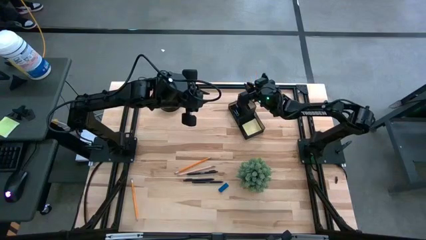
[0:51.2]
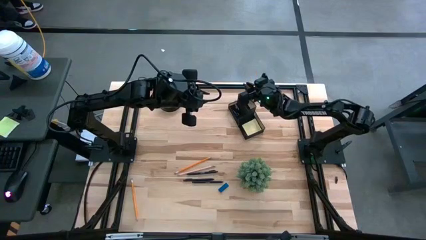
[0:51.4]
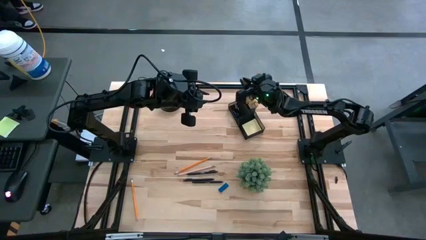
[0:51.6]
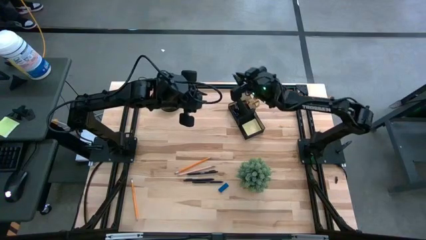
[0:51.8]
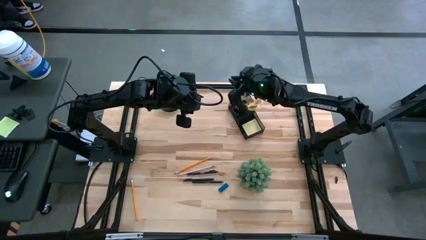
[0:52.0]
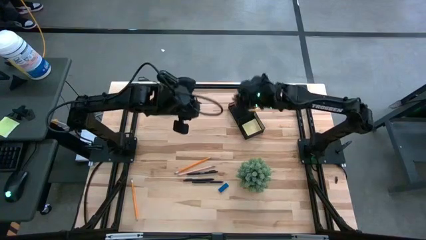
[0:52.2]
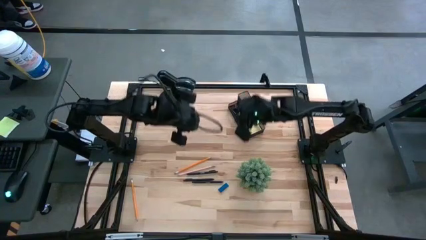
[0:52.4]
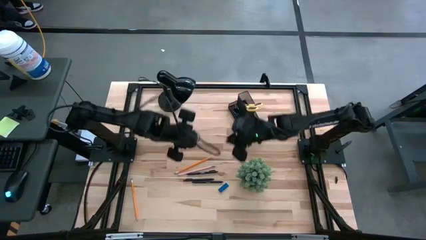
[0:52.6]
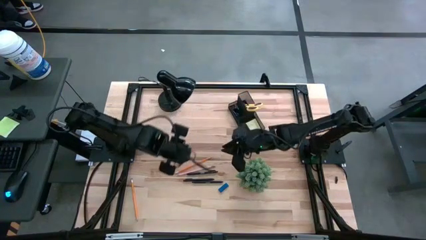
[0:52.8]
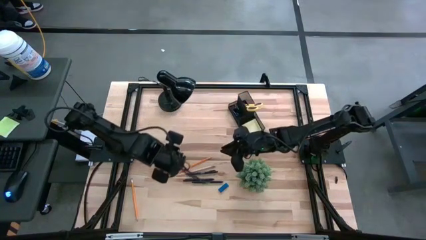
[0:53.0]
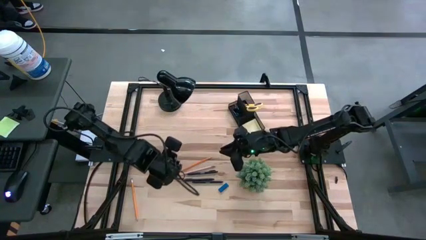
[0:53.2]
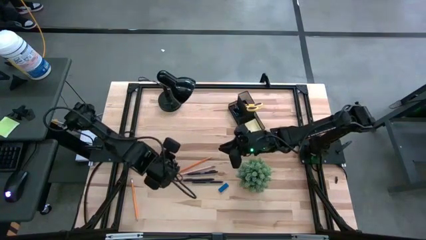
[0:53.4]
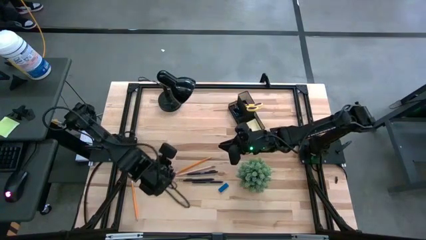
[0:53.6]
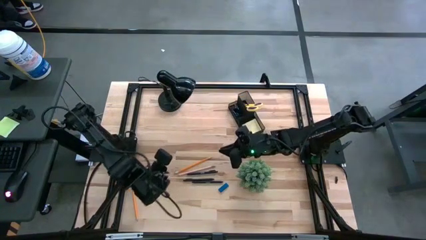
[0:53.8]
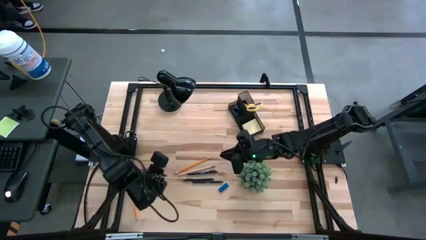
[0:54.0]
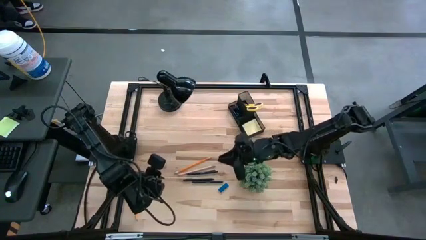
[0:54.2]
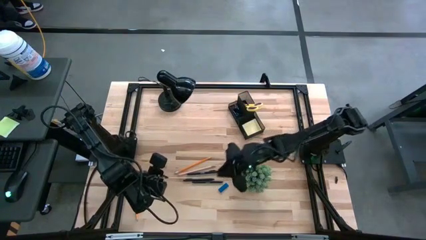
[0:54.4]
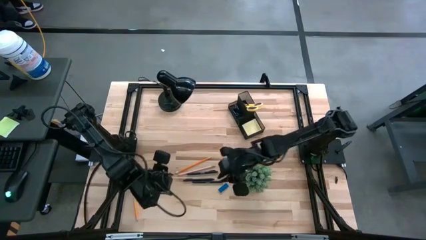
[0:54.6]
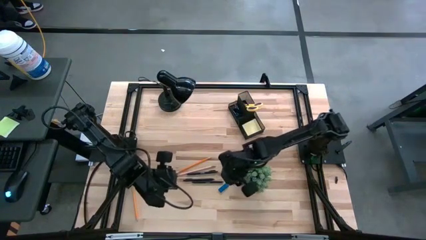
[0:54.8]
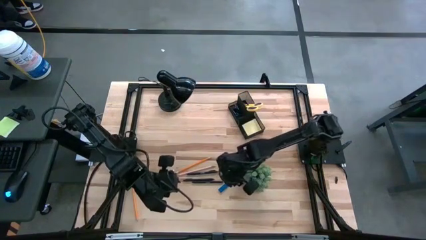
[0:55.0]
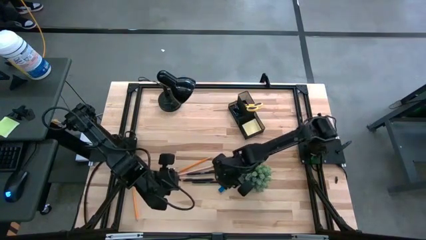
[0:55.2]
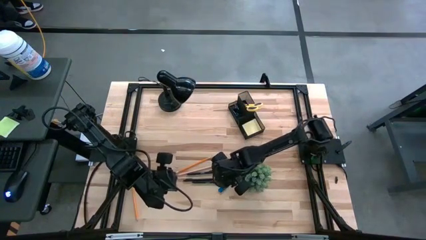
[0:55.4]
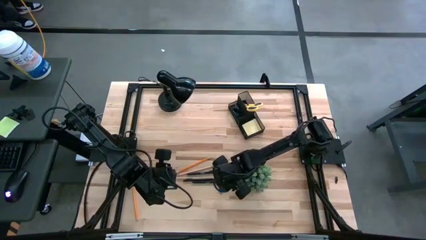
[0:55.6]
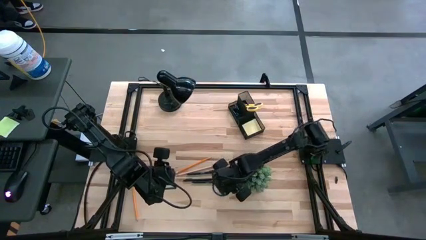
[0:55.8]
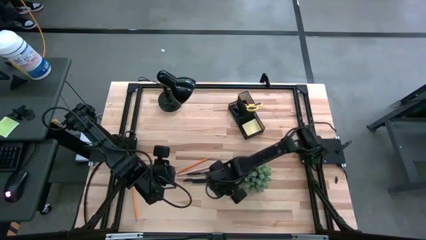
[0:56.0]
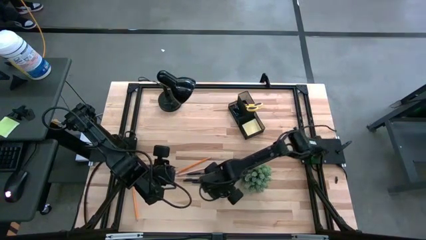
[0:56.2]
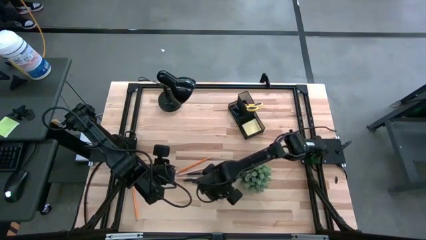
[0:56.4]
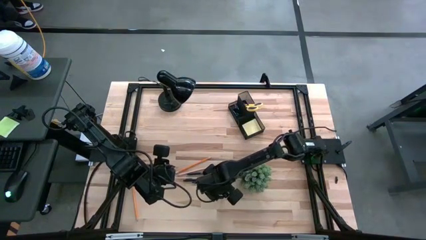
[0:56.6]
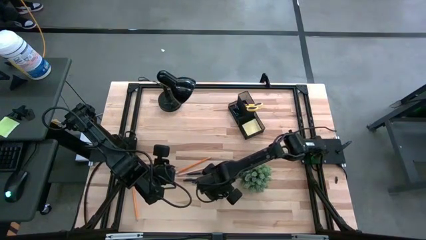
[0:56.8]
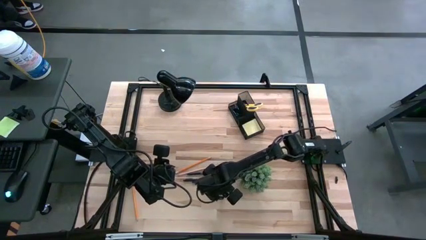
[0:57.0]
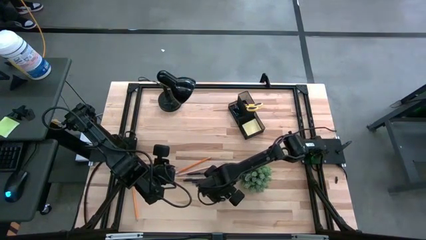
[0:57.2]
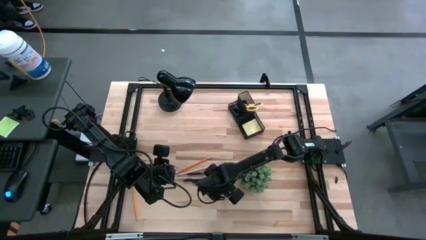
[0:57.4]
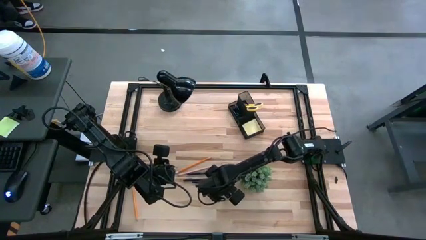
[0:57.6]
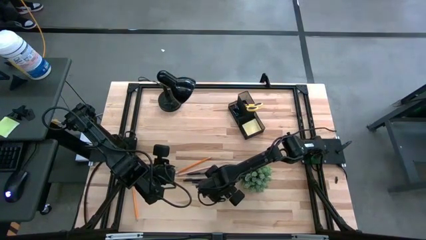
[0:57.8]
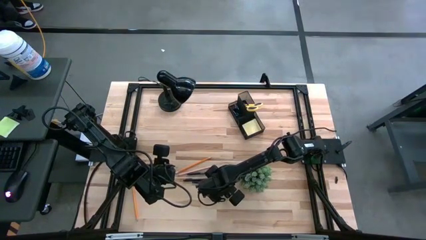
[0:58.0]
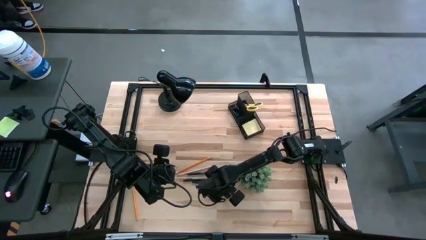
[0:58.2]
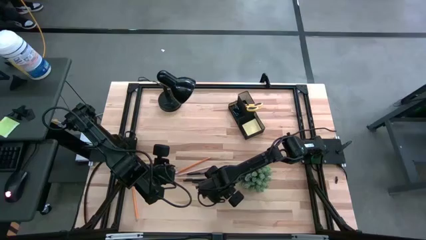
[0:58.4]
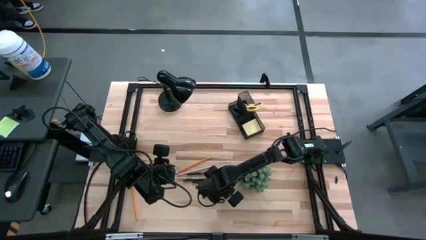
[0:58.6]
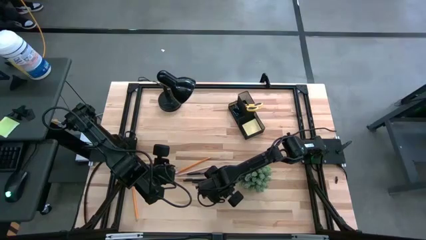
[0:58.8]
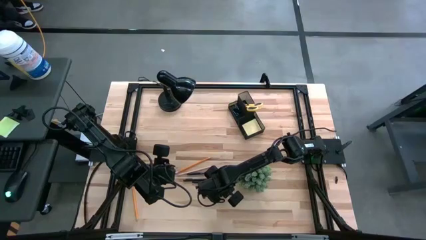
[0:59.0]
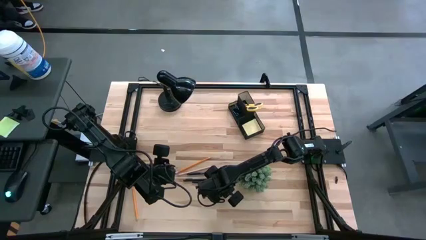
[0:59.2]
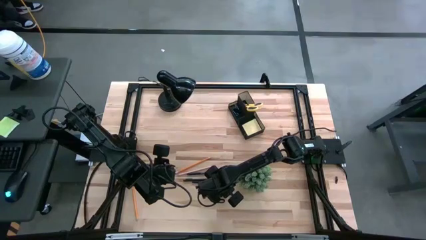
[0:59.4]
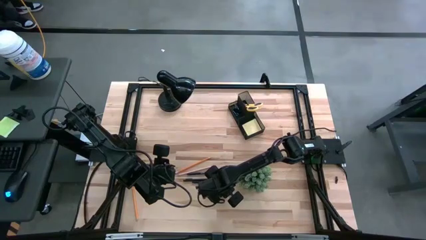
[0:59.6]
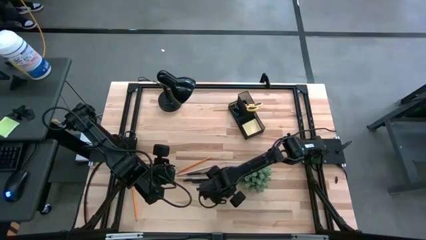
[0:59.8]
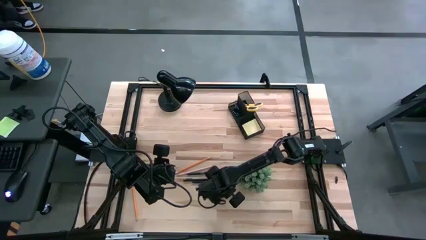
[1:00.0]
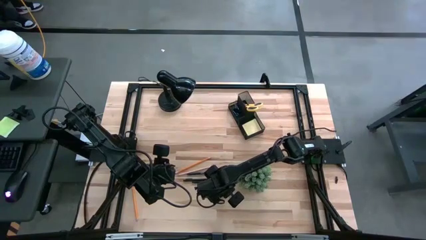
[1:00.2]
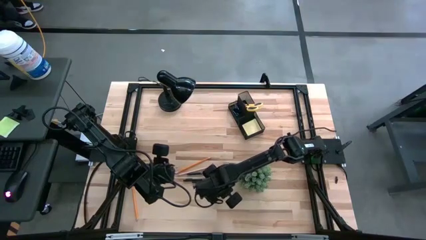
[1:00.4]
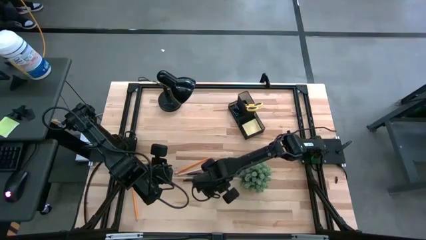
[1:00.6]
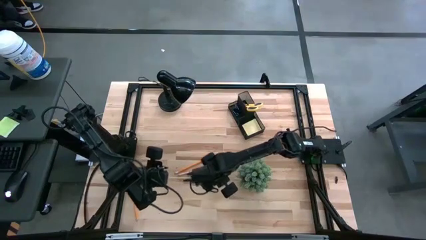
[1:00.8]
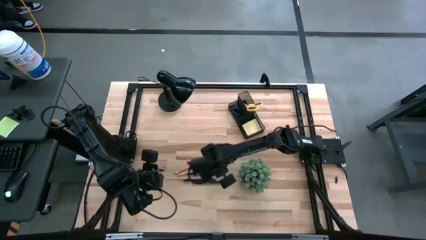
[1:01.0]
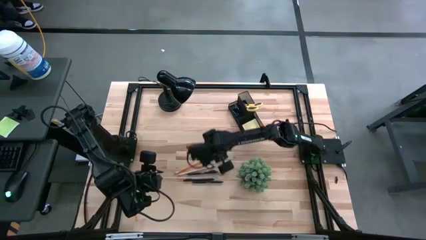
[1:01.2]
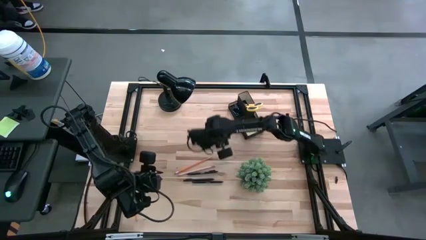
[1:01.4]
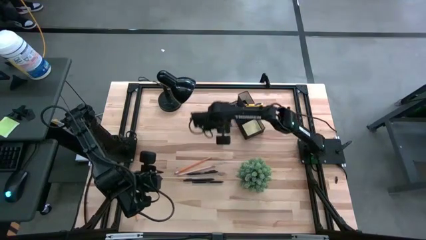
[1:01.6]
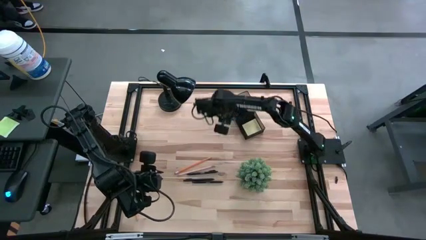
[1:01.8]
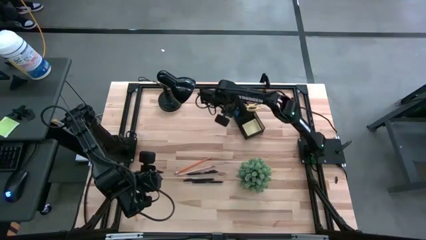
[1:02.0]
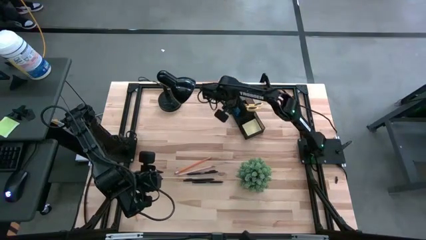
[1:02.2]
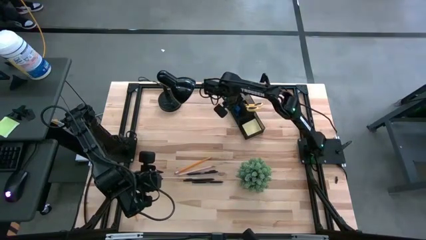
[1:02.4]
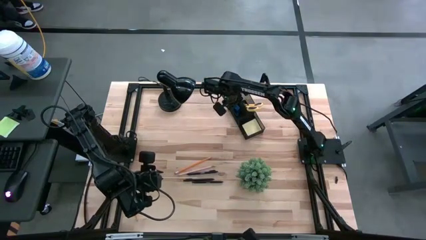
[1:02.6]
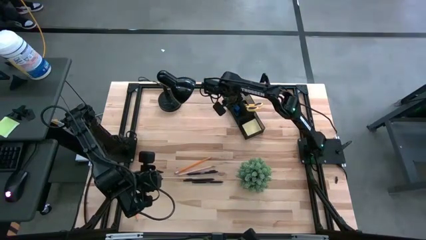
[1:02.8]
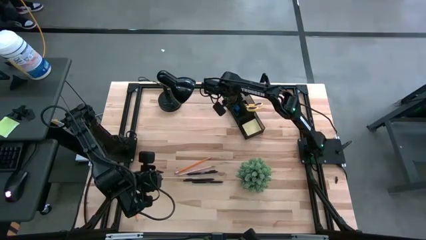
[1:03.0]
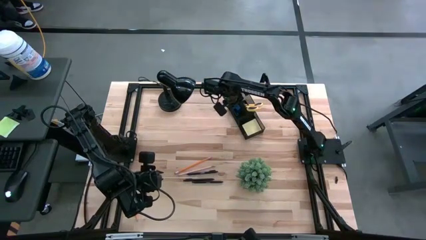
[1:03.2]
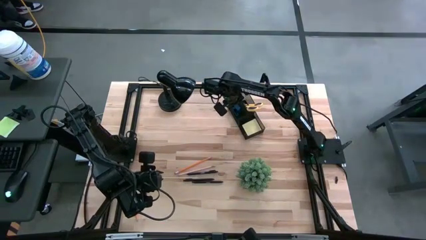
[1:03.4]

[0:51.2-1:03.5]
Task: Pick and place office supplies into organizer
Put the blue eraser into the desk organizer

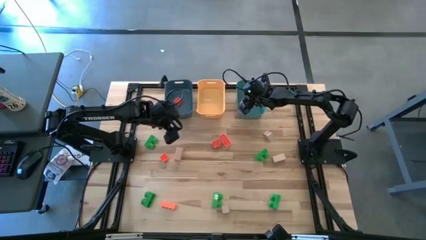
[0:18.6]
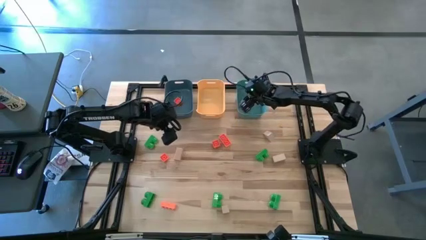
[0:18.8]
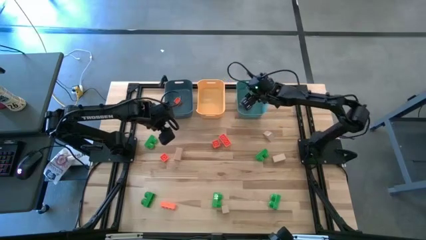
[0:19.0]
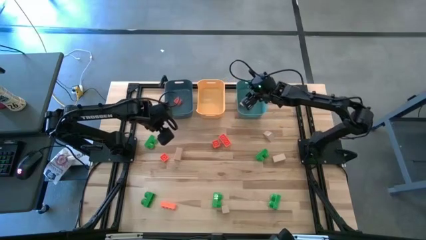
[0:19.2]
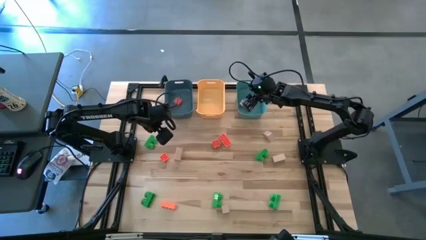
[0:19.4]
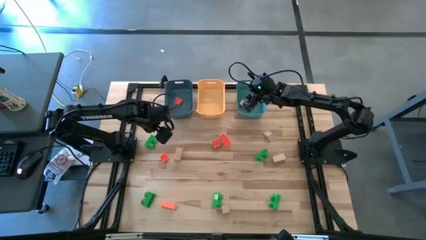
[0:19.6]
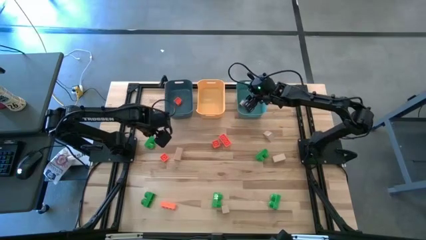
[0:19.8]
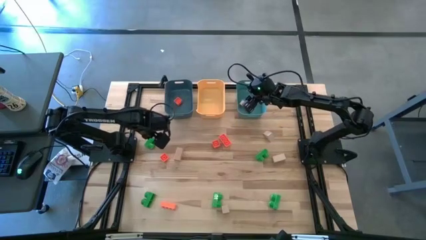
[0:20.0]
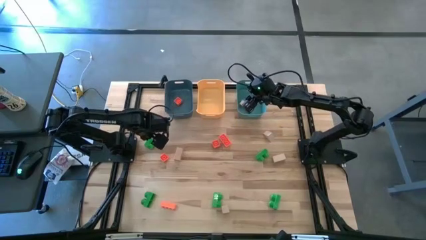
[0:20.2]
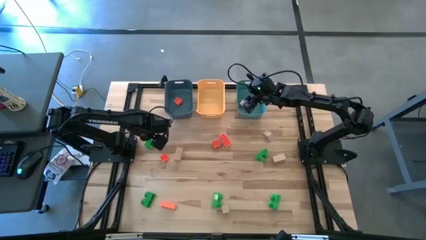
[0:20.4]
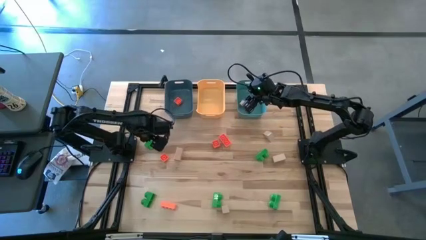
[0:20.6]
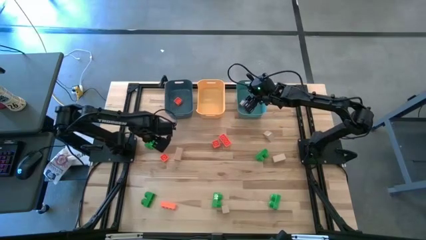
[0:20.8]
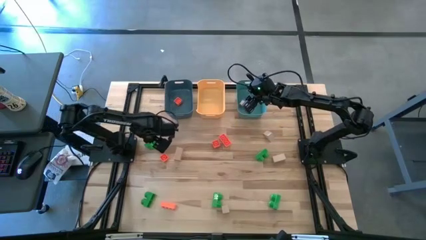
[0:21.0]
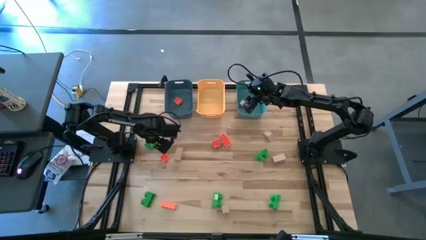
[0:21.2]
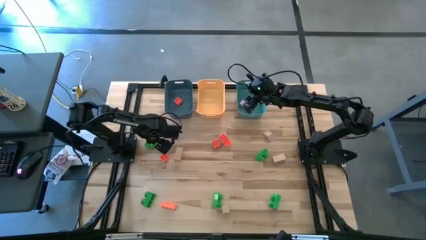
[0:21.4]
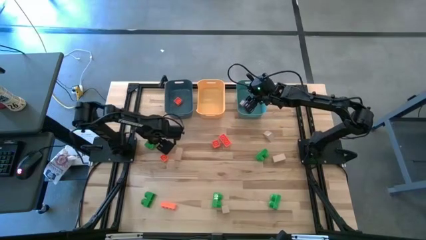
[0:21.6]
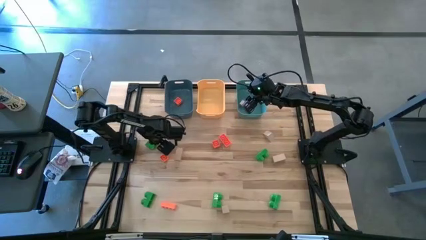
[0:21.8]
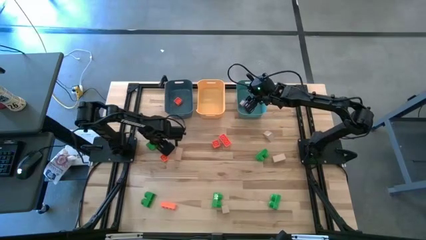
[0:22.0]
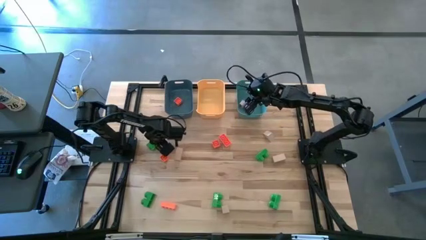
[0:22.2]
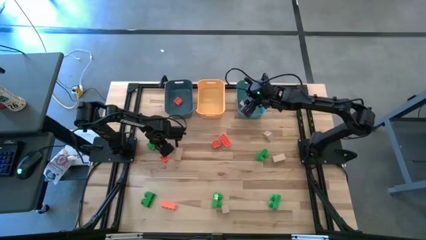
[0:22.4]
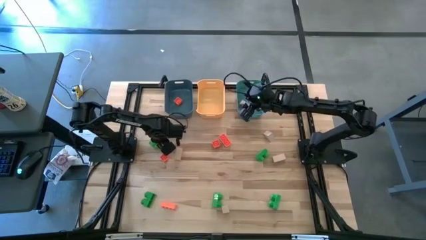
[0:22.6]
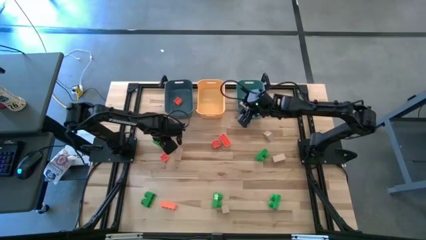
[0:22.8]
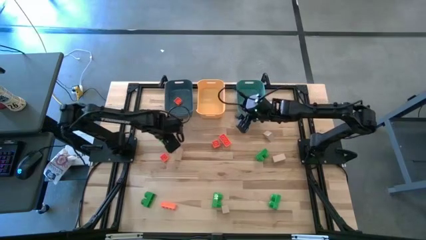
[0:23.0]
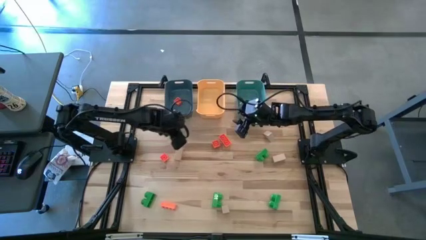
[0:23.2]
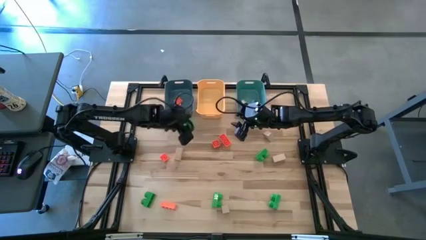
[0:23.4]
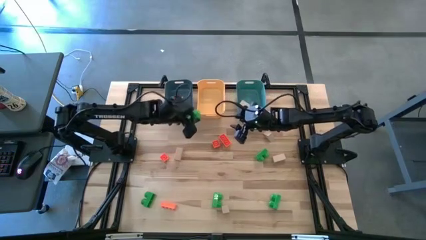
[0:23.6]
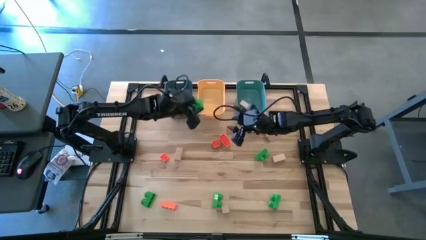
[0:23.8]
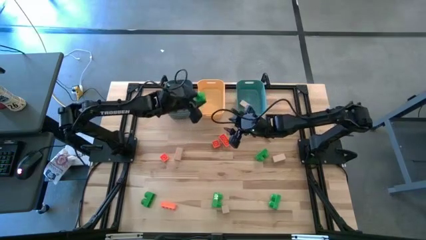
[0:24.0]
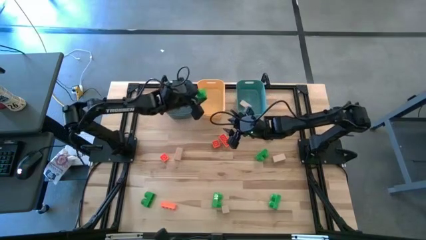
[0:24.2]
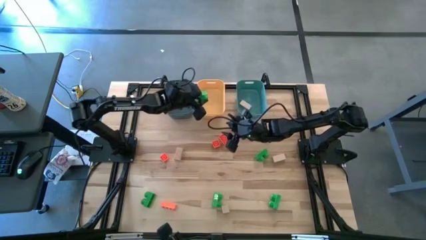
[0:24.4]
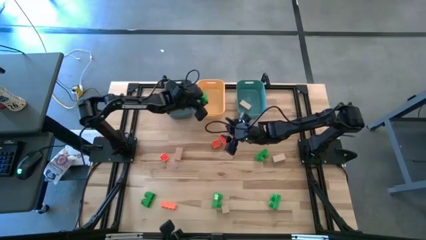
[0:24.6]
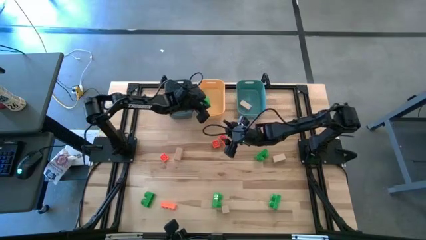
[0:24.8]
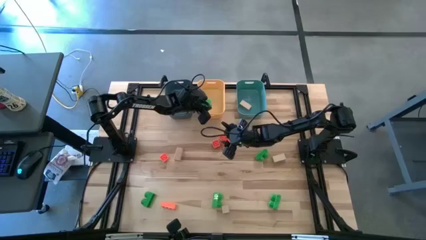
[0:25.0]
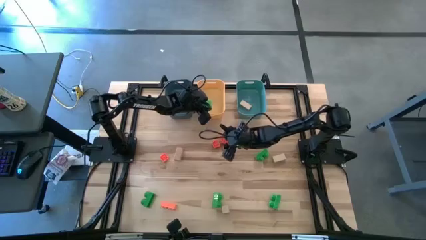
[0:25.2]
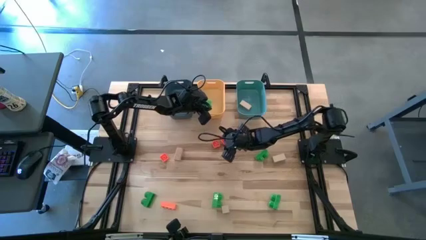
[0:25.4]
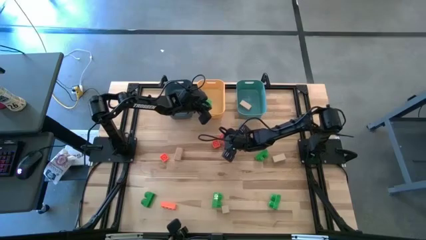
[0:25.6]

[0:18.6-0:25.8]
Task: Sort & place blocks by color
Put the green game piece into the yellow bin
